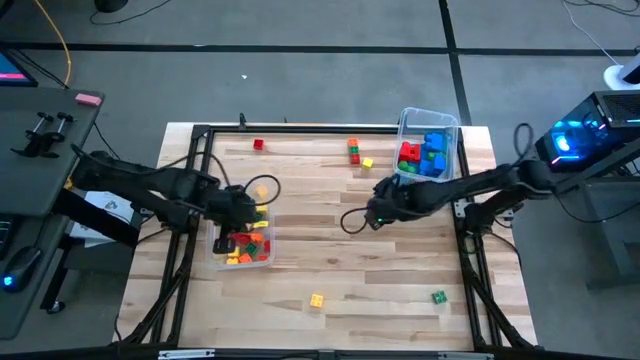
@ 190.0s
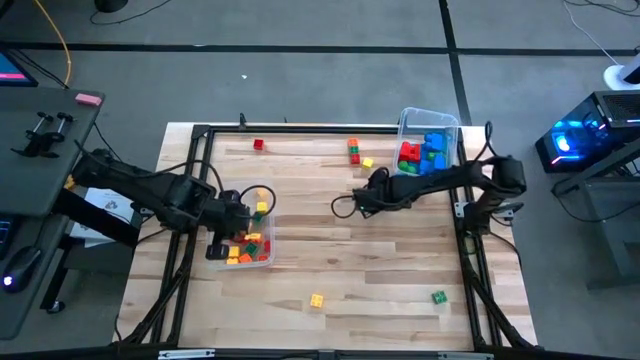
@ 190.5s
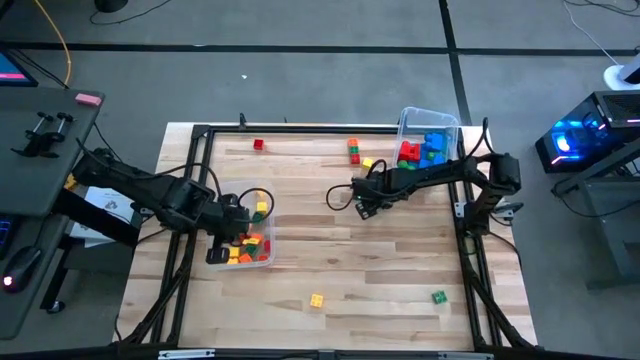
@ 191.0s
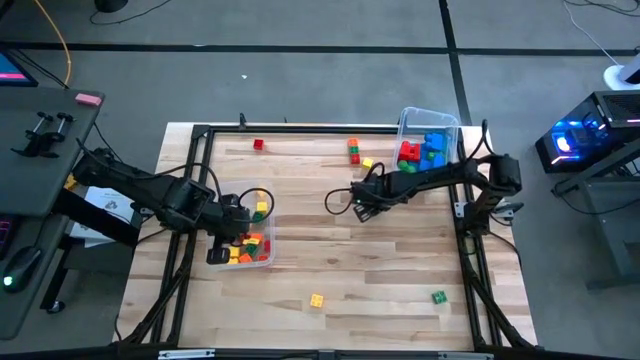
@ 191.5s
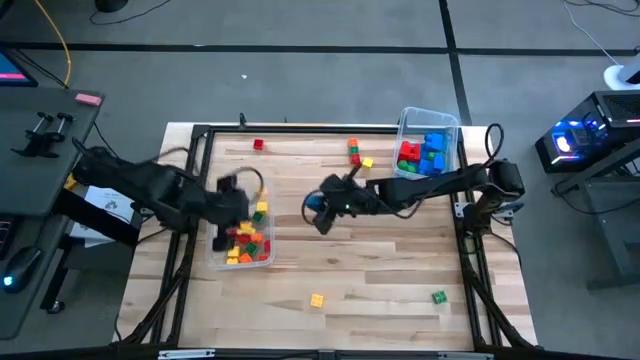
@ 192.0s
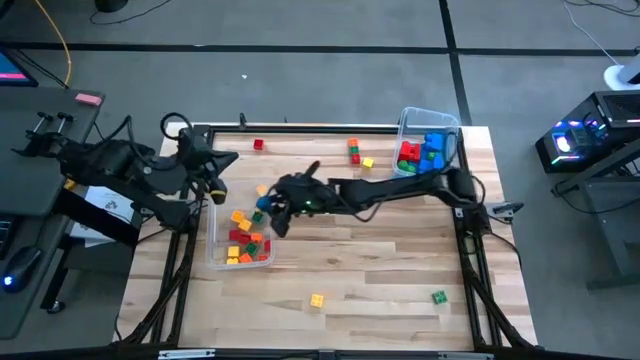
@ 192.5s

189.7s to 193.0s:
Task: Sort blocks by size
Put the small blue block into the left transparent bin

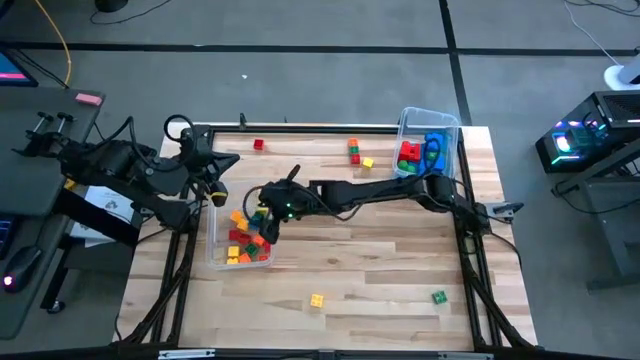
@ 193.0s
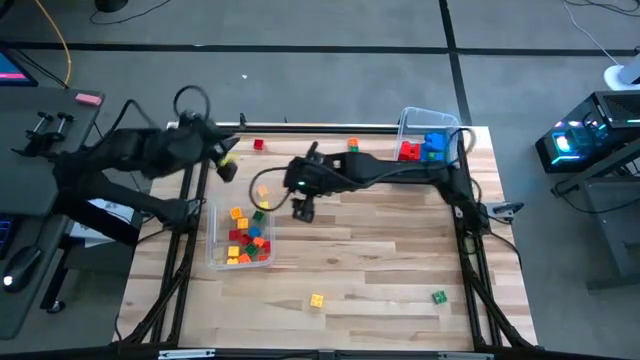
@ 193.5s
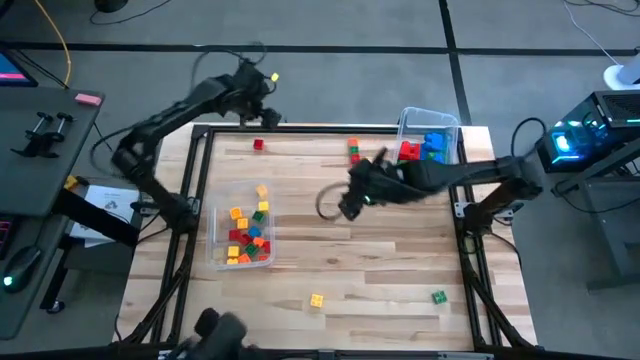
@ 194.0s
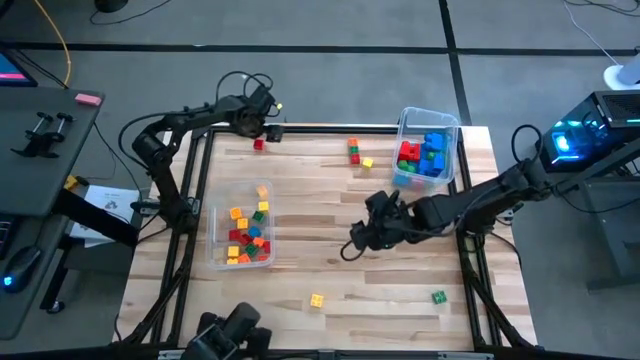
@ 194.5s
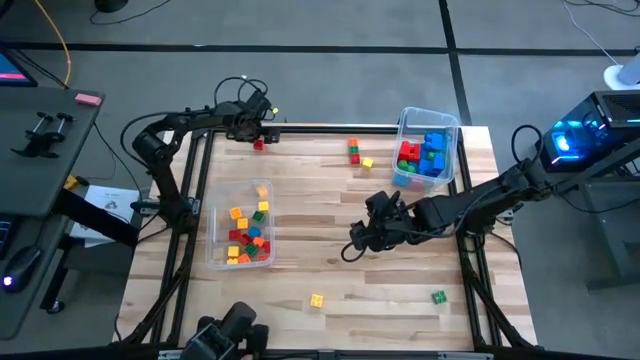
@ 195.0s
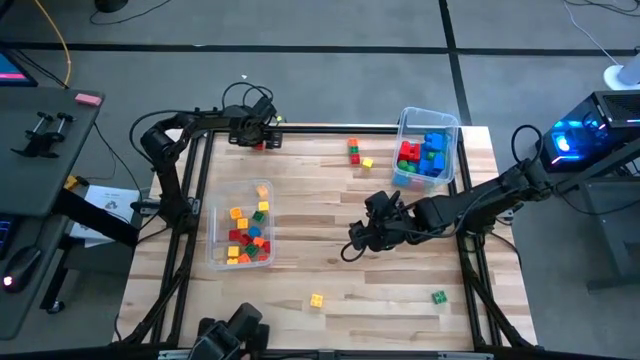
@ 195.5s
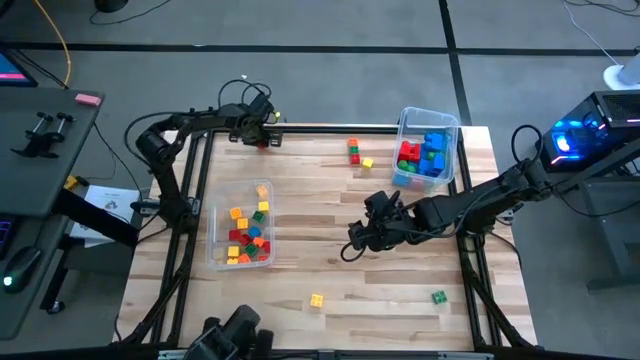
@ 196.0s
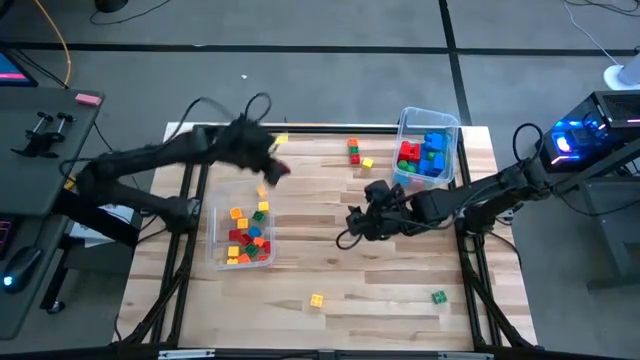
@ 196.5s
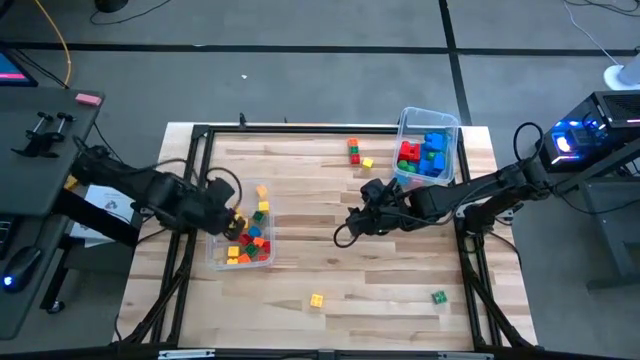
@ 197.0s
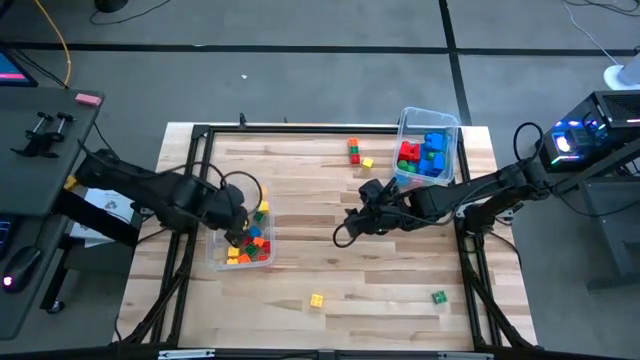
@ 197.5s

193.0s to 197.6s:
Put the small red game piece into the left transparent bin

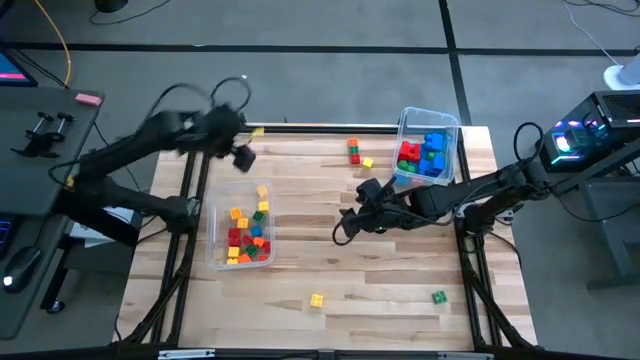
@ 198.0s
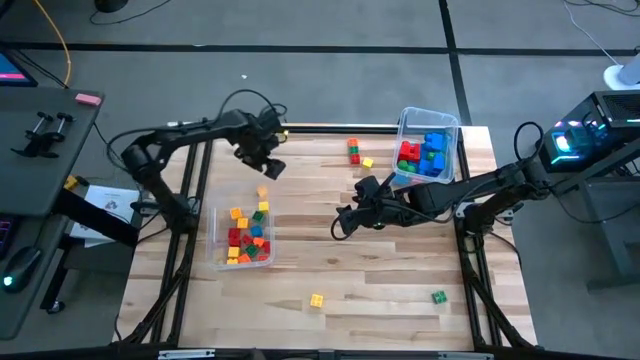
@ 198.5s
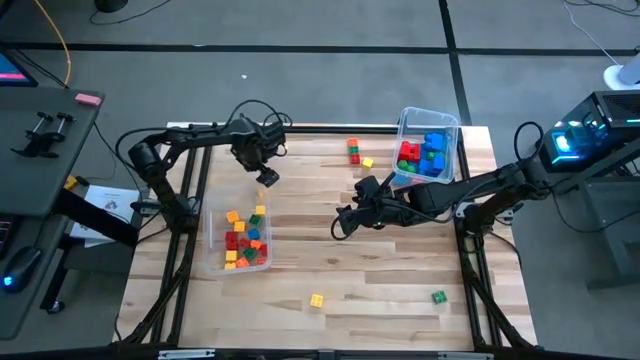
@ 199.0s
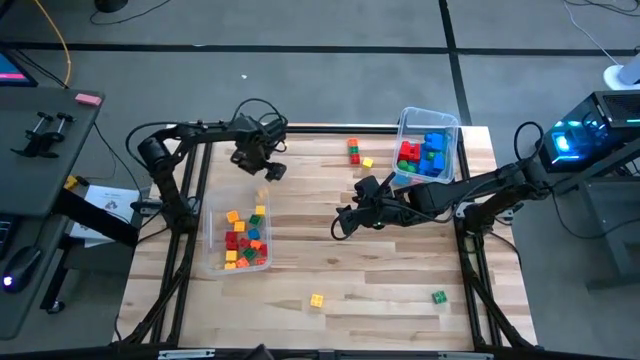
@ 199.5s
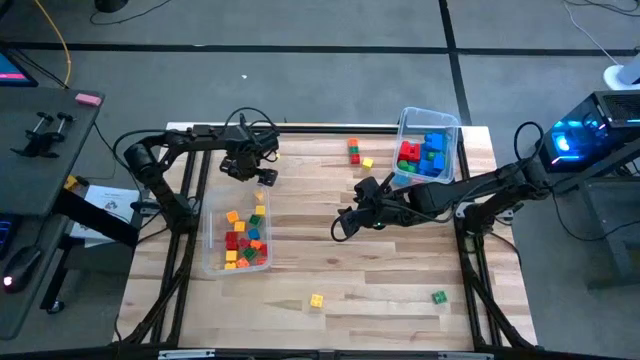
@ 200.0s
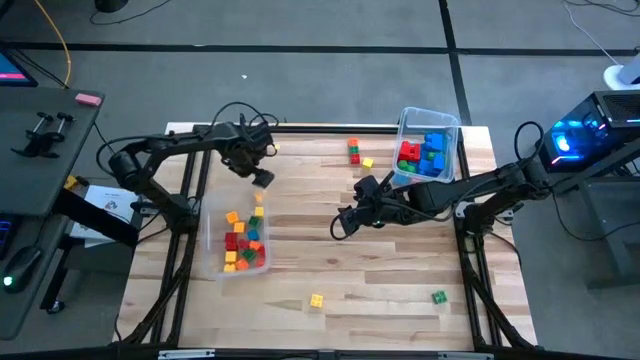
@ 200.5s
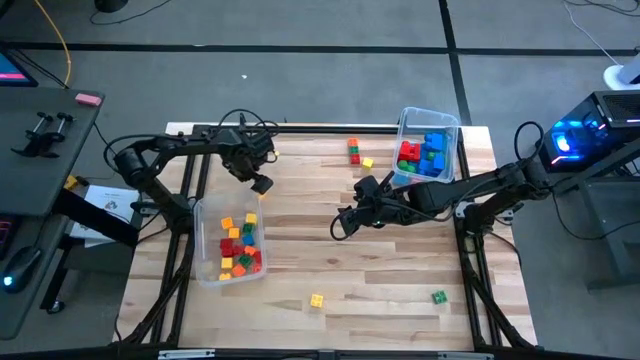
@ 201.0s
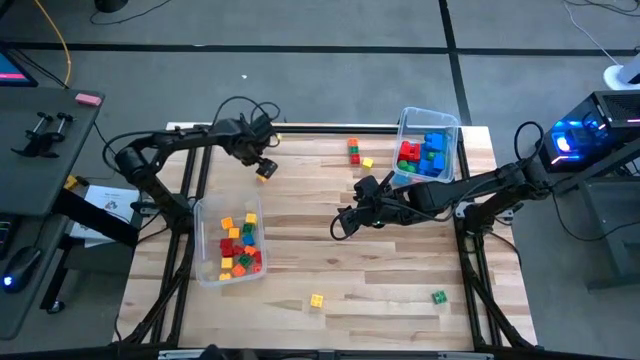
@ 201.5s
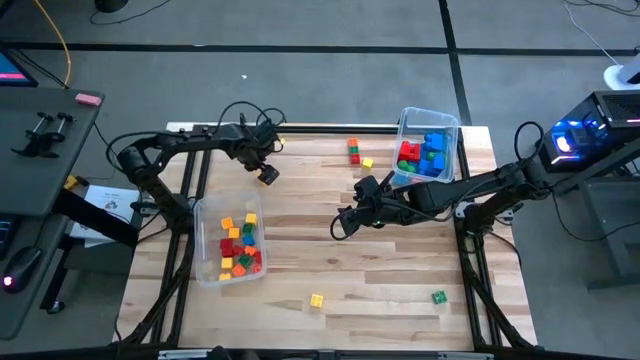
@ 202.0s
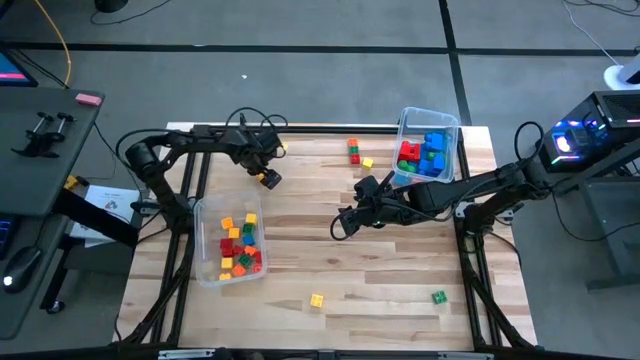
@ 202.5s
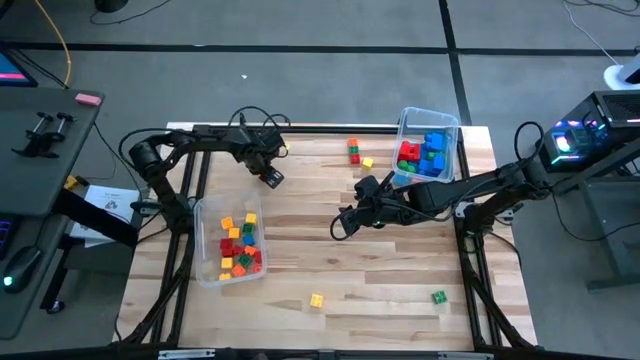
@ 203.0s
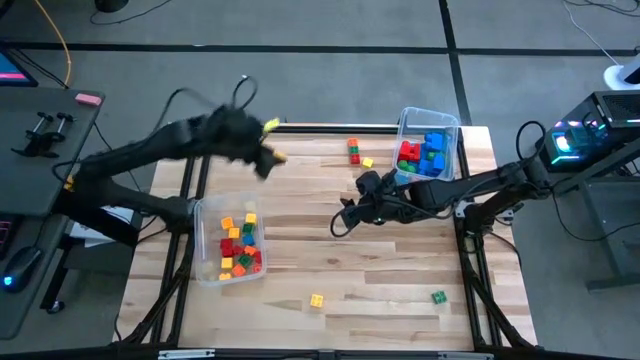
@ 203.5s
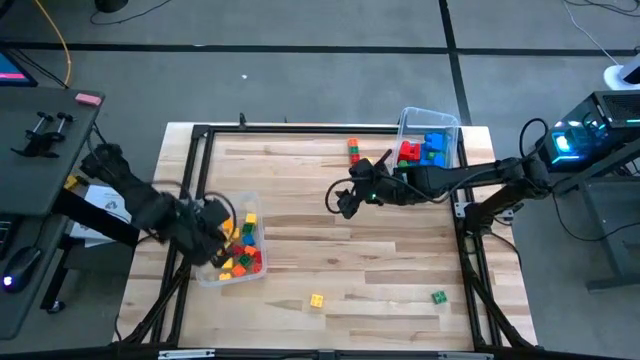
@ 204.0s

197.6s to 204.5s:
Put the small yellow game piece into the left transparent bin

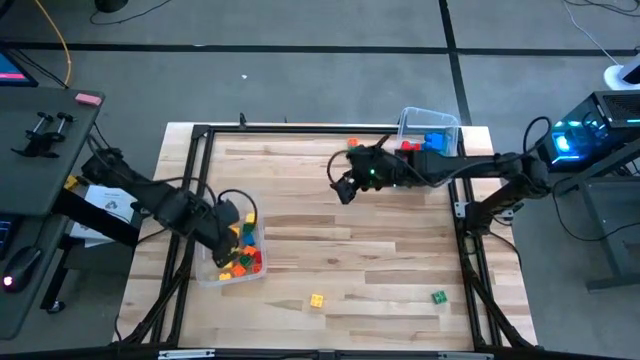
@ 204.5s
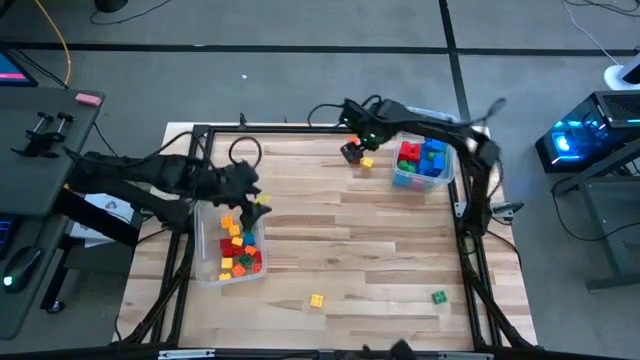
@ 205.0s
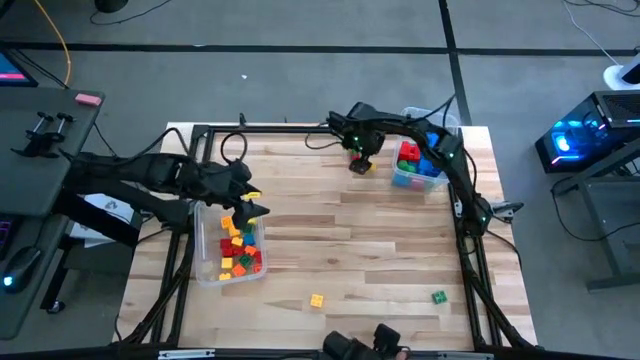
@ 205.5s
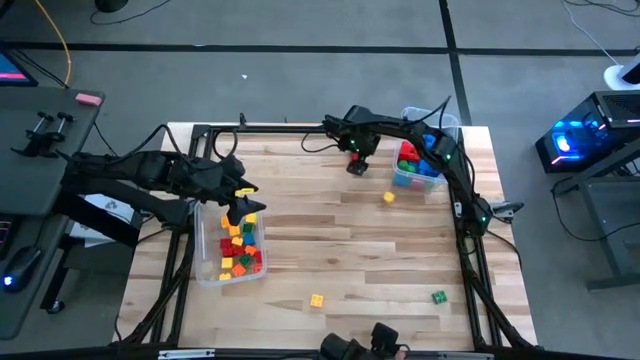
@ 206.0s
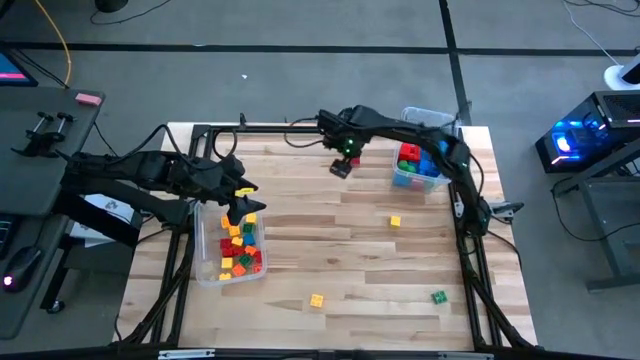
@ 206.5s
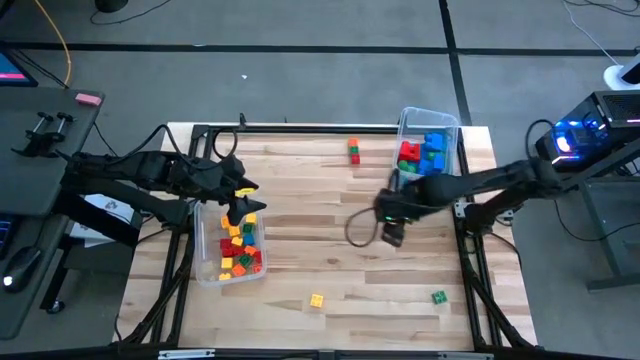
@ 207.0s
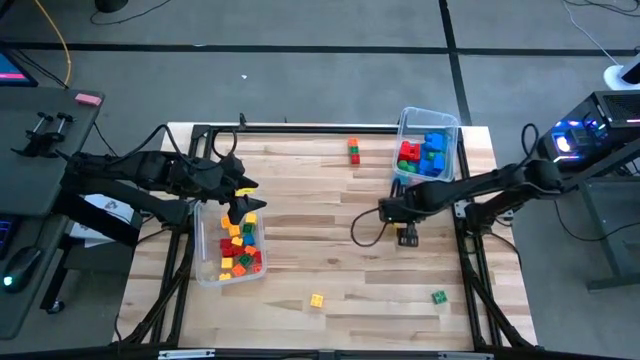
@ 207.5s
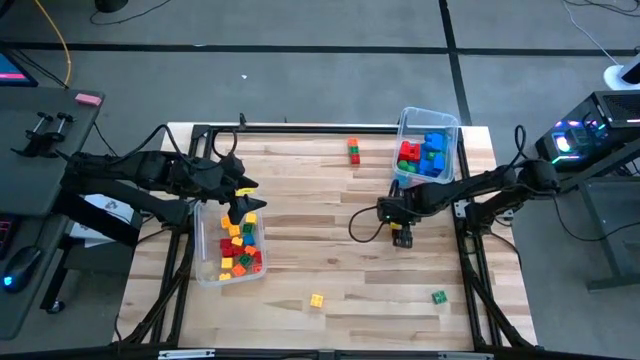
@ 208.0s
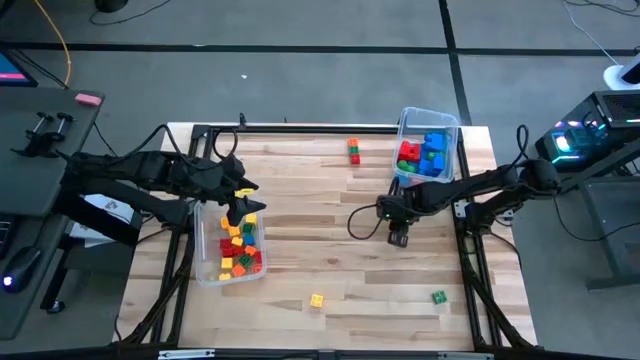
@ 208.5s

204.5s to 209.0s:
Put the small yellow block into the left transparent bin

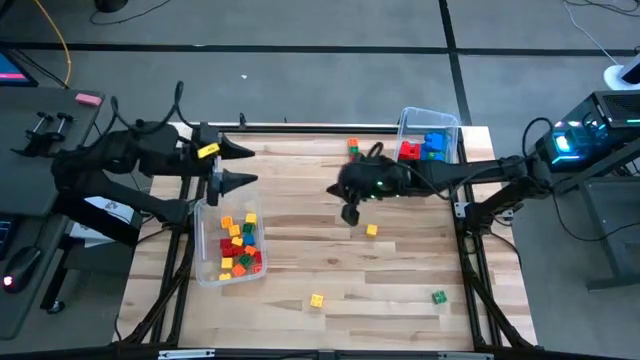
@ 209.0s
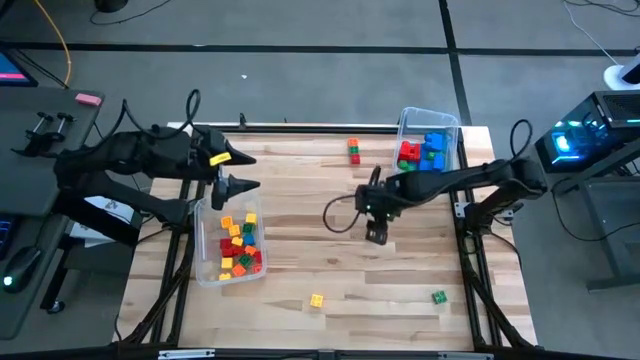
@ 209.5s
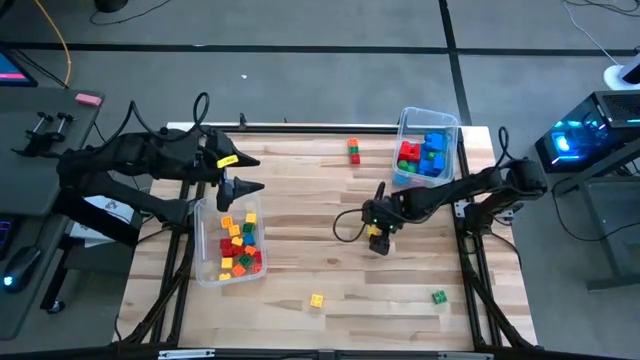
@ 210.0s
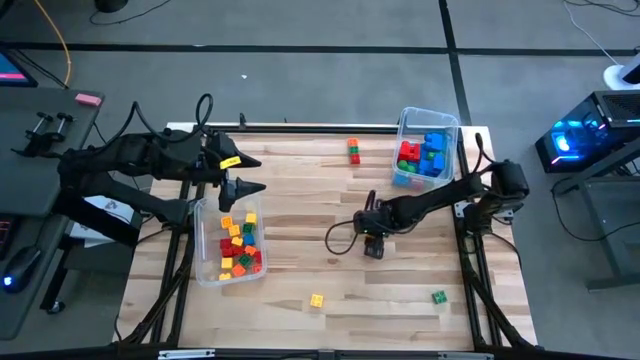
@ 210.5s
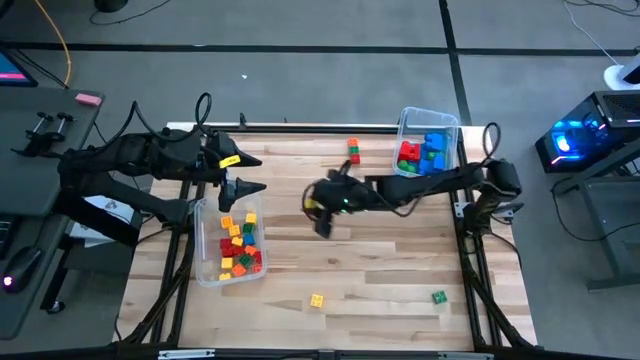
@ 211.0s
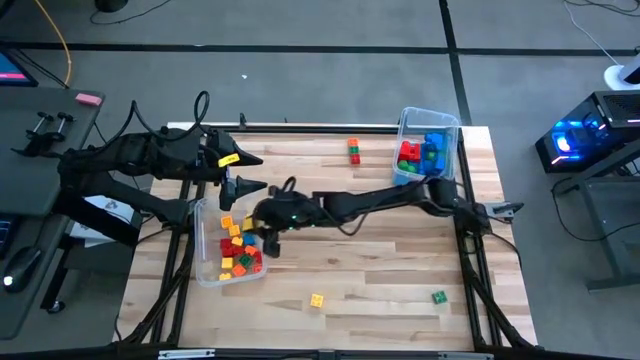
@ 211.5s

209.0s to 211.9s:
Put the small yellow block into the left transparent bin
